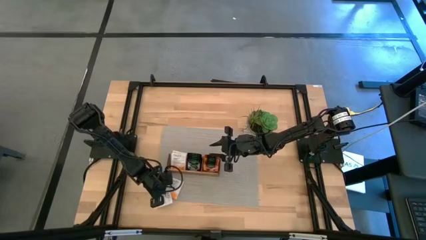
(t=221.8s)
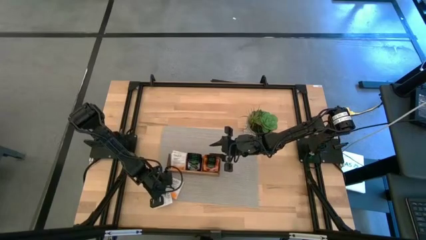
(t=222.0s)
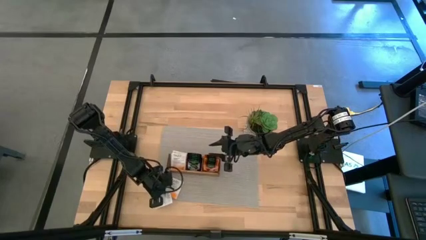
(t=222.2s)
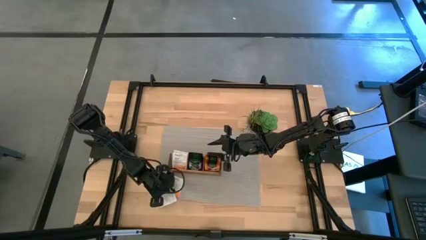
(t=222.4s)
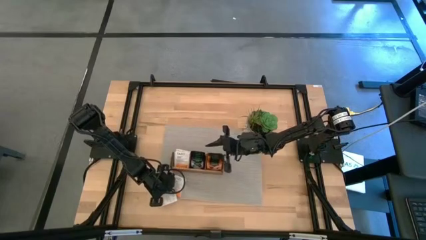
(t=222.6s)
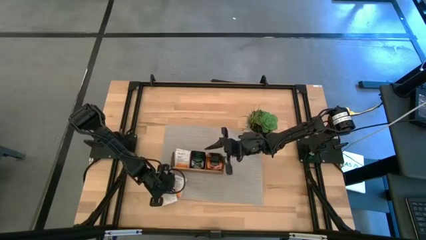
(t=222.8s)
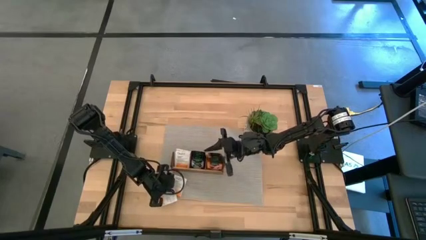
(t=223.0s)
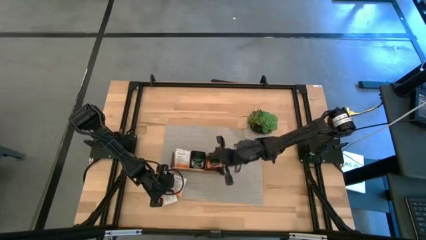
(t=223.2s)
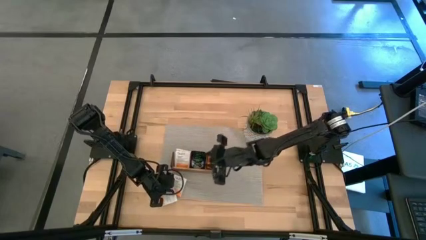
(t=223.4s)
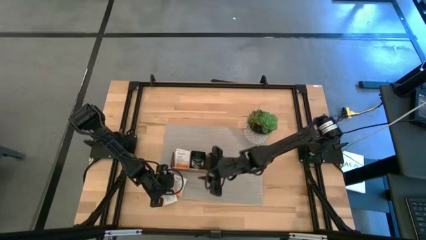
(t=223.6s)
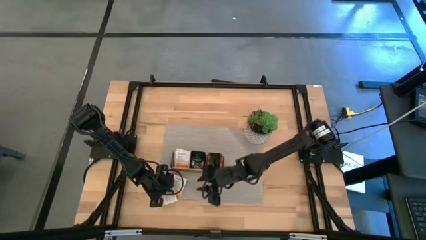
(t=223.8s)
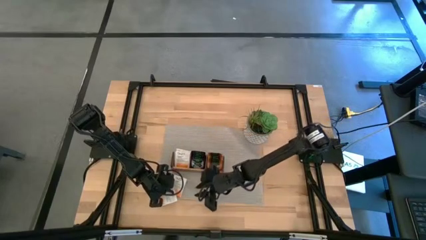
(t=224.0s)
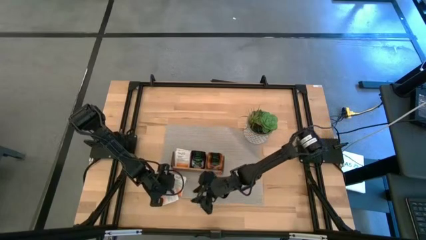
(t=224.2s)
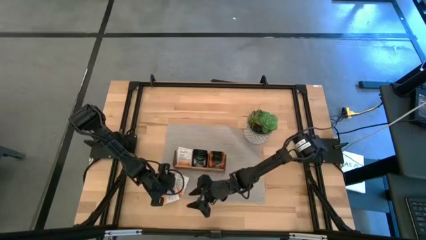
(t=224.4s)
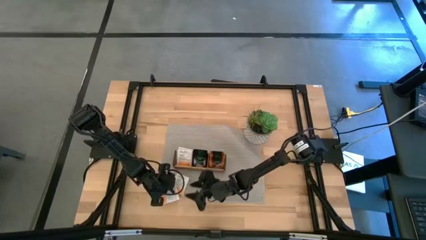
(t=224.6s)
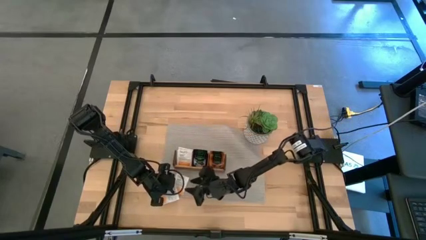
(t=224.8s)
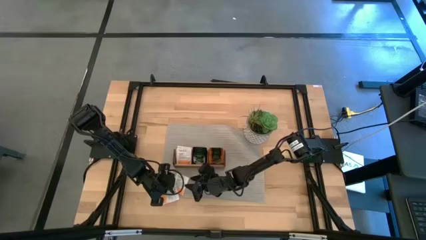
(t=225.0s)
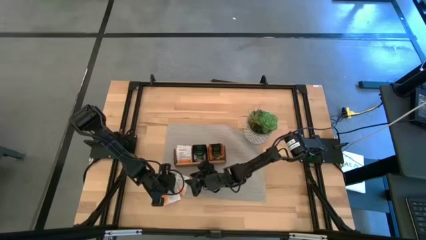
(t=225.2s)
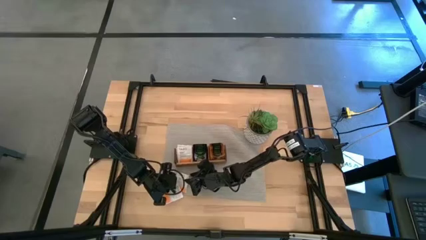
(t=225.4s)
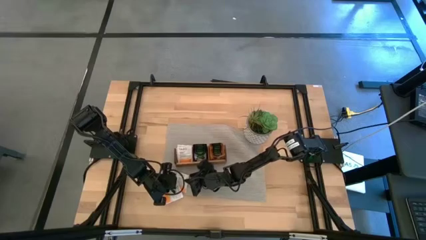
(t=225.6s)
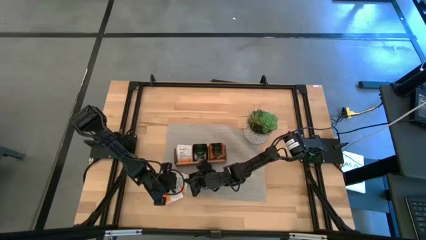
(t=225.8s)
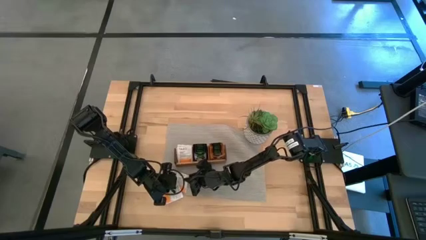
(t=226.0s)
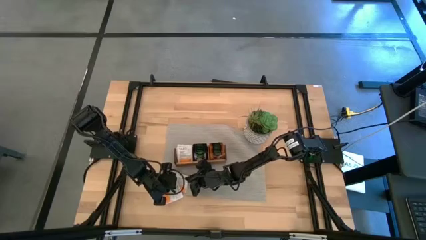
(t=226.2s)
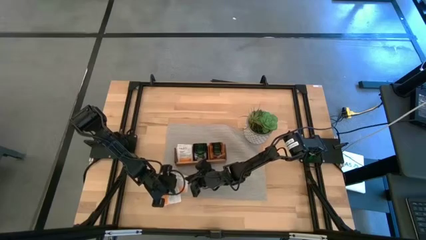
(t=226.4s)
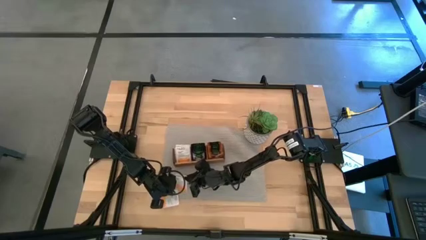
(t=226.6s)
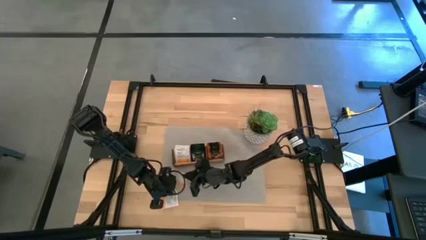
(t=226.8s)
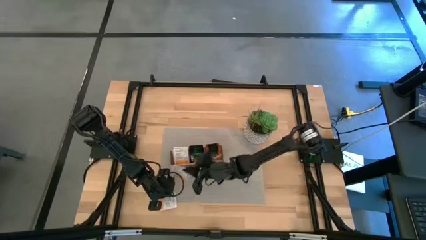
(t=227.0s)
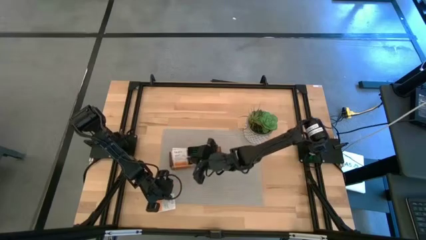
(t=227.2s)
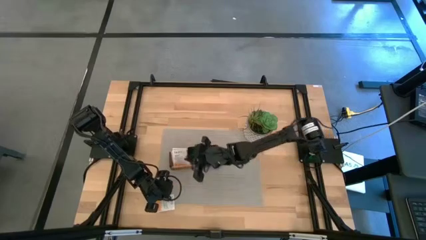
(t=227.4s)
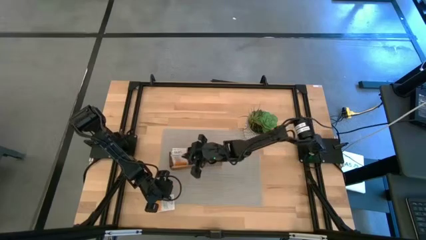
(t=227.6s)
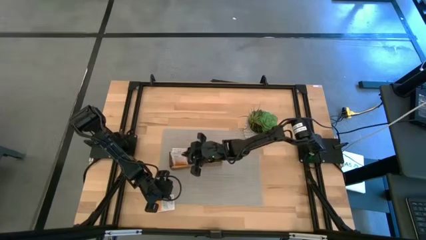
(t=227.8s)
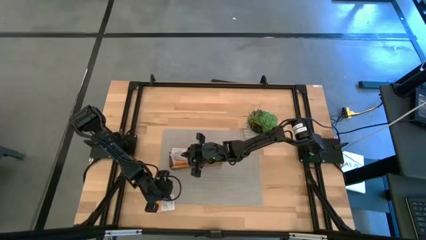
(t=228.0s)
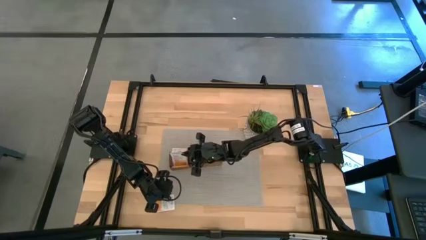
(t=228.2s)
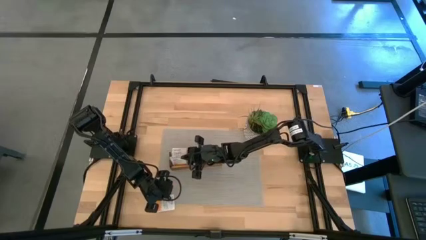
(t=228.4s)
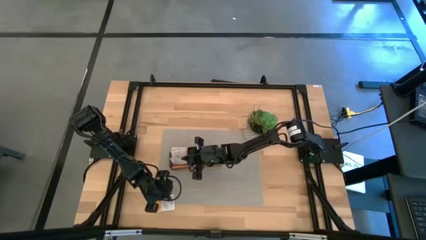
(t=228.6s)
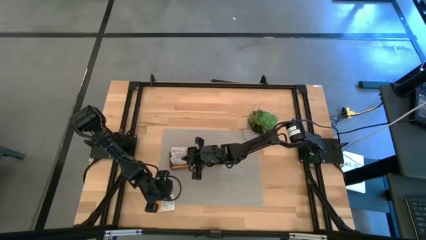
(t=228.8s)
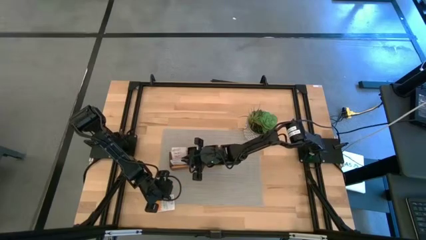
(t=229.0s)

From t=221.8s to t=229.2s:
Task: Pick & Place Tea
Put the white tea bag into the left section of the wooden organizer

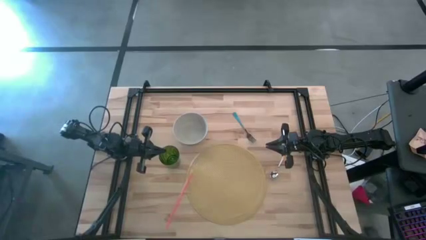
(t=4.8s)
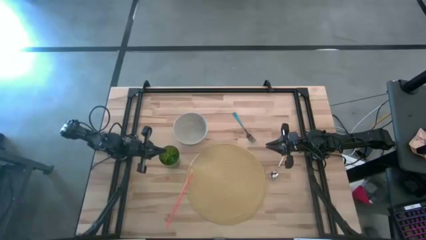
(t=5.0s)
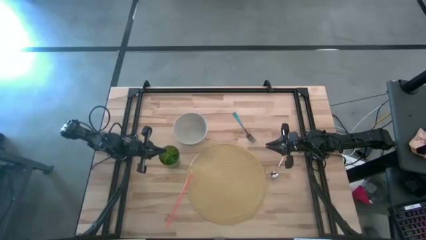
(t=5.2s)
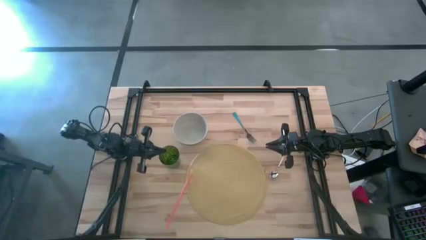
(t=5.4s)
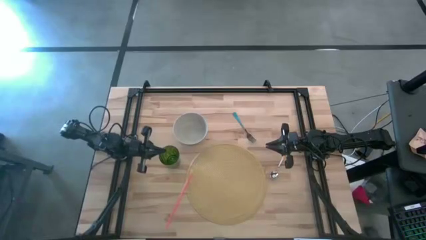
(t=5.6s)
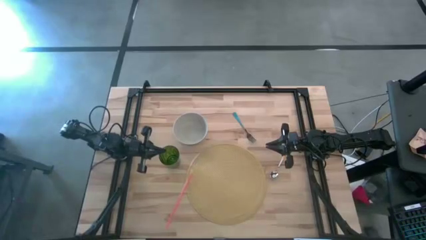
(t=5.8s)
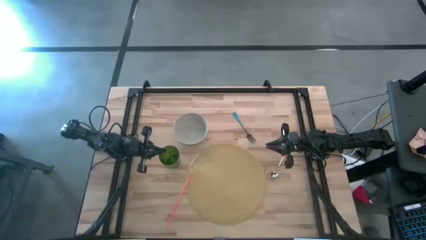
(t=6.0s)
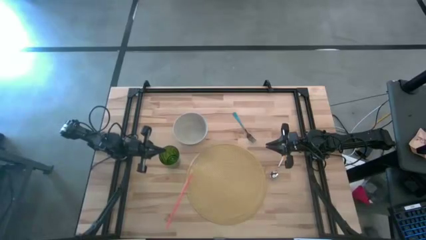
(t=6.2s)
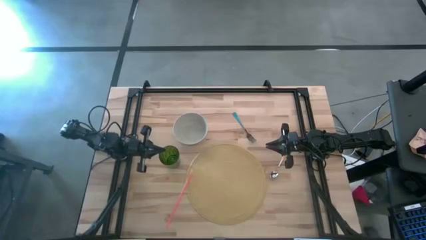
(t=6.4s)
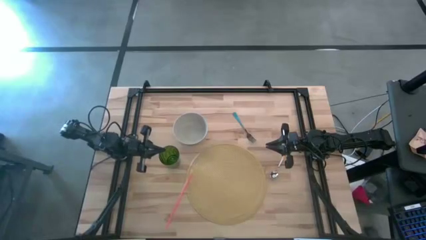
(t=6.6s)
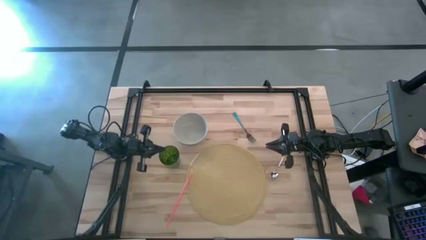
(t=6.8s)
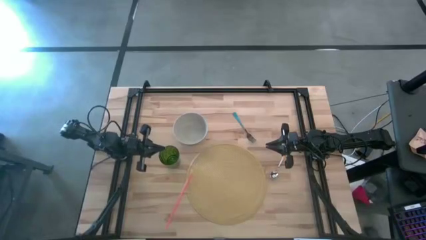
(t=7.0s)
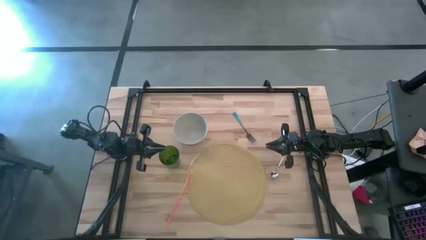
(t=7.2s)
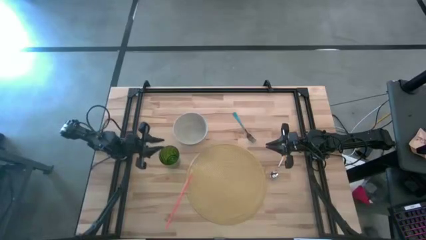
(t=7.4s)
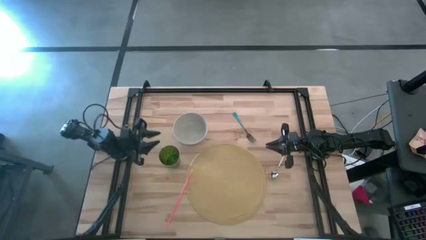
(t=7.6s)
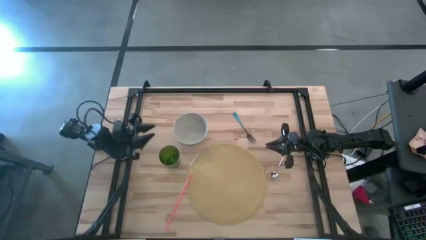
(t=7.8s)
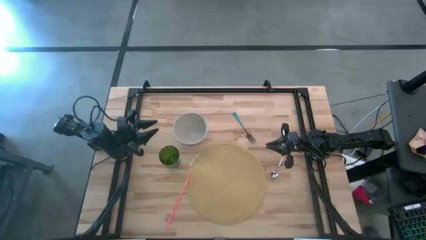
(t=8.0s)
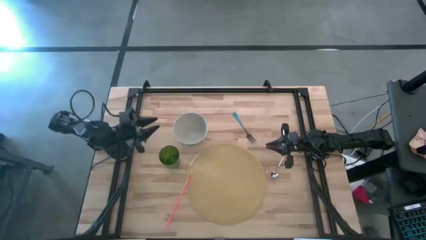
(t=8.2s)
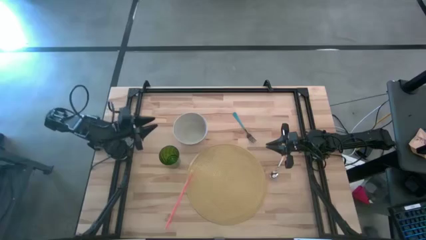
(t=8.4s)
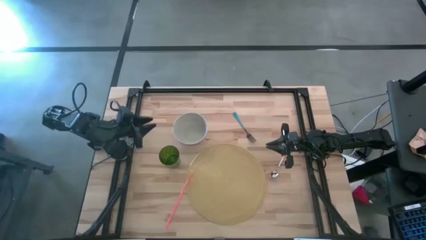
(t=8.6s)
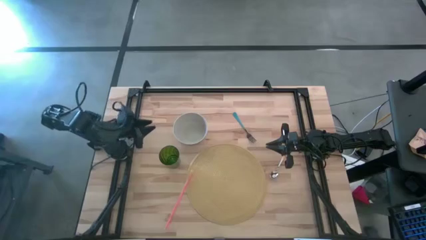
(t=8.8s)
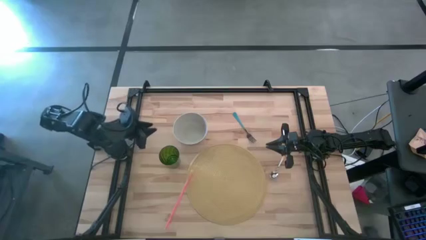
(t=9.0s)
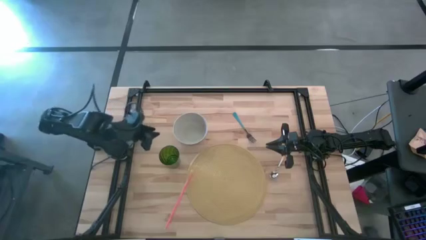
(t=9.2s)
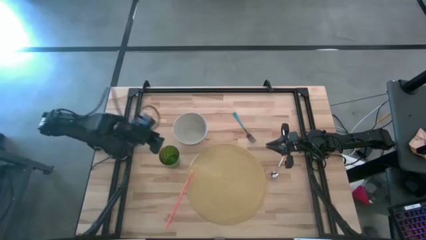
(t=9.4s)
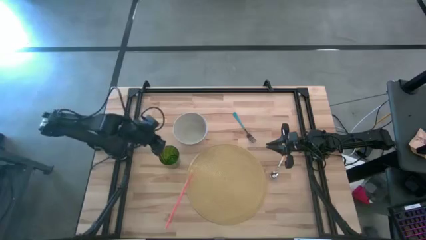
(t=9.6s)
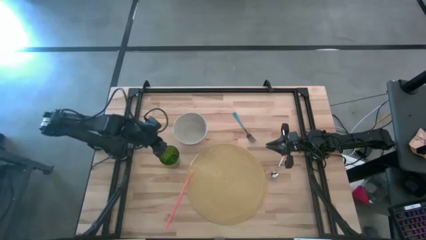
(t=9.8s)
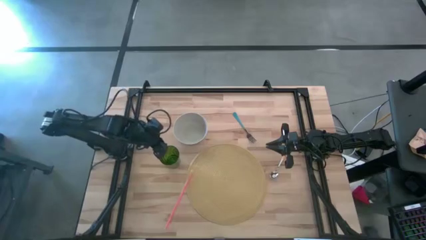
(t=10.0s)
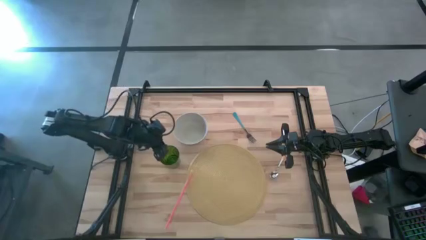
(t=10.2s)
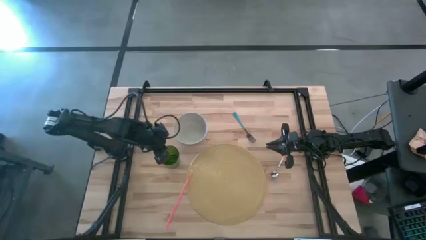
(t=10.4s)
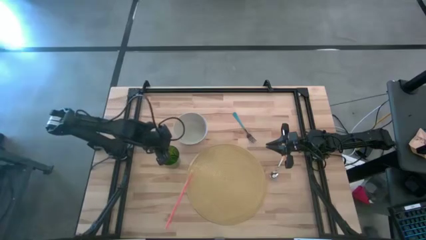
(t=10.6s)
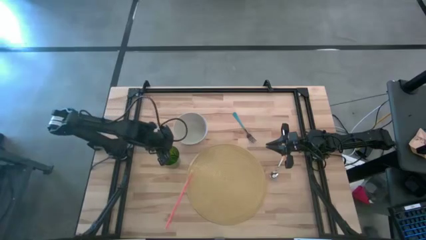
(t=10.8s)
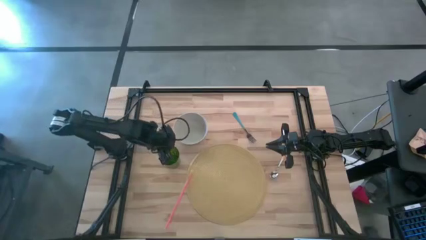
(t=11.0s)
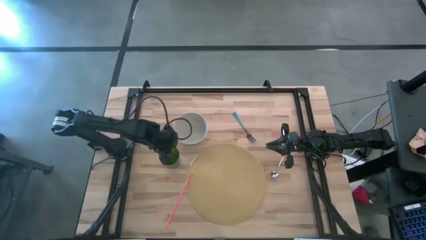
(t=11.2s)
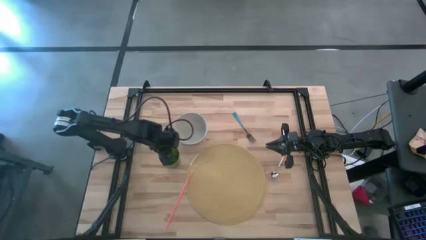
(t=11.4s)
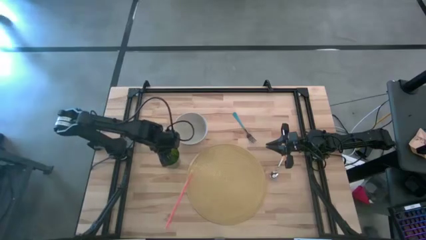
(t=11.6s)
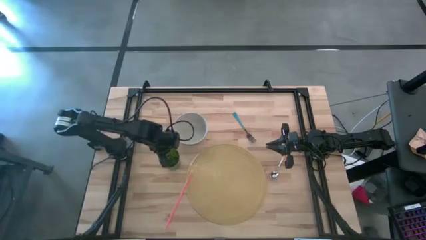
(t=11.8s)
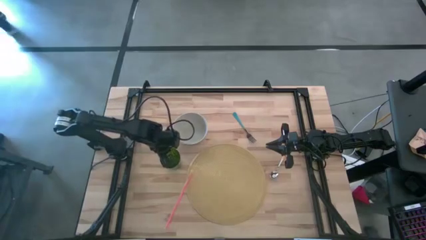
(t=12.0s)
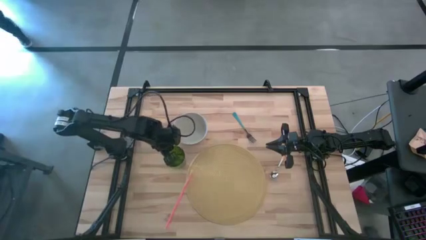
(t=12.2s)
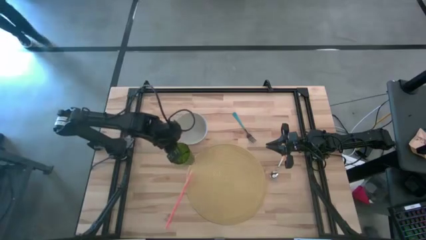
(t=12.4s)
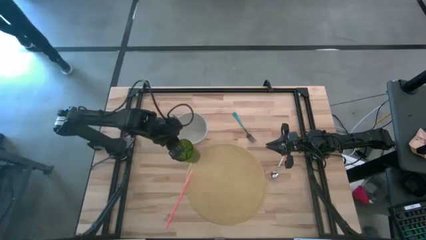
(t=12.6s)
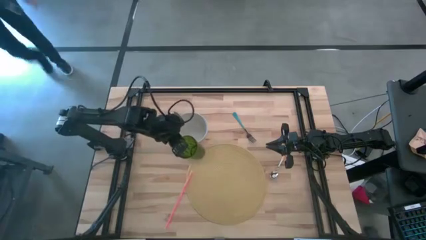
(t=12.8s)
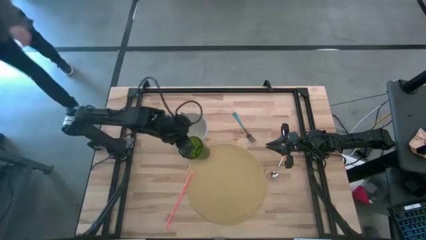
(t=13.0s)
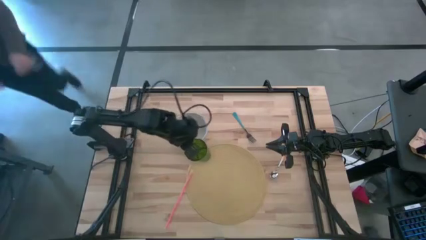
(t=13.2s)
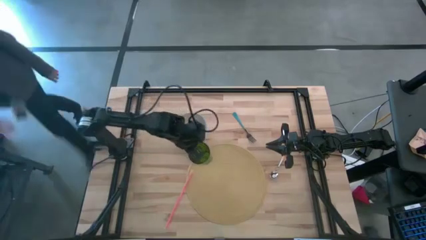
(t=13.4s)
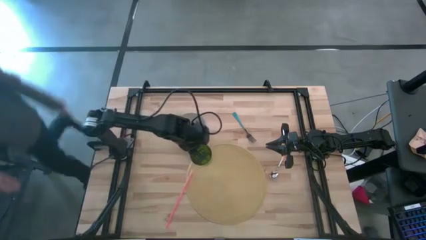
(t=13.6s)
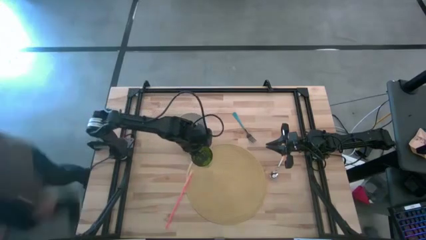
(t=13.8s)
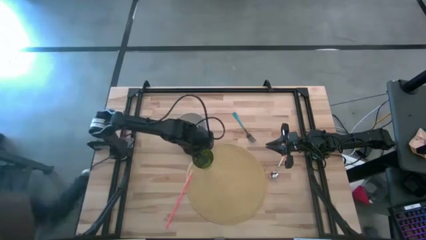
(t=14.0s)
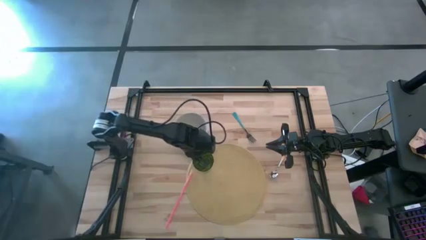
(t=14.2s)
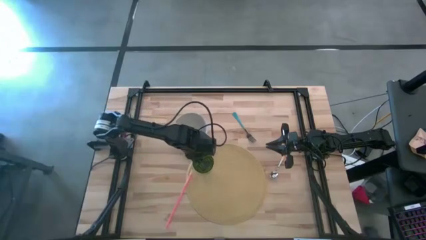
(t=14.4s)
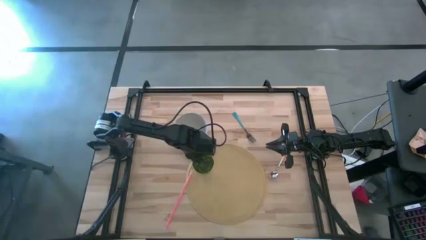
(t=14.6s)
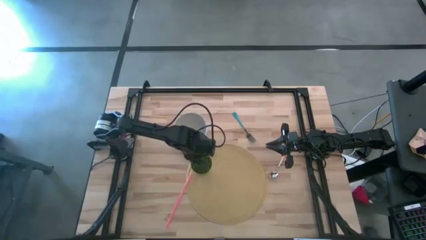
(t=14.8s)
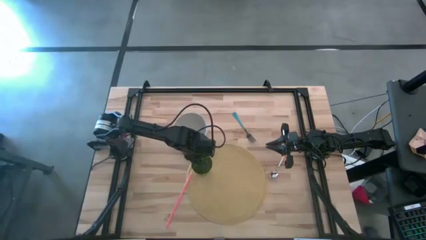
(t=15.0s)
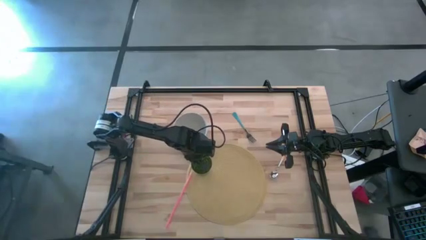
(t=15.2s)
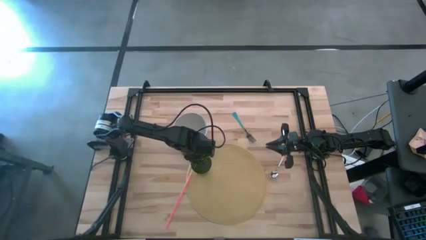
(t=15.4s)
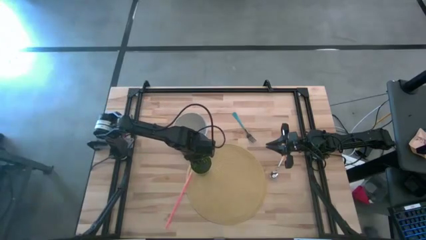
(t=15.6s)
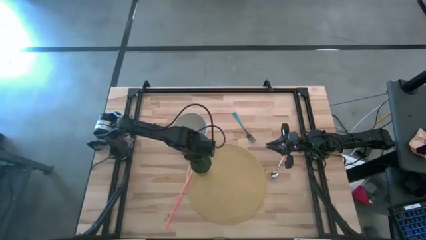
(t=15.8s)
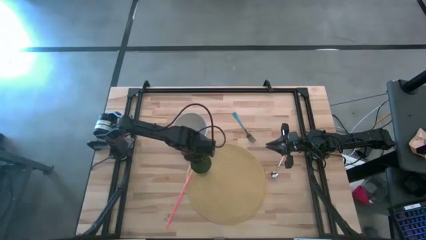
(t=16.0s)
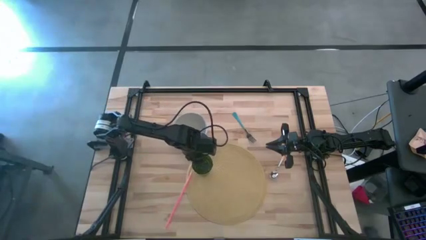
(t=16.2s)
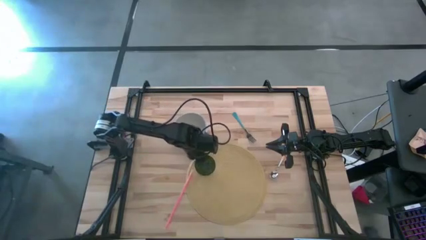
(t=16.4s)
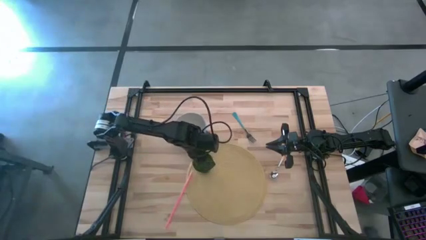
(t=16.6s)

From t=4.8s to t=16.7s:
Task: Pick & Place Utensil
Put the green cup on the brown mat
